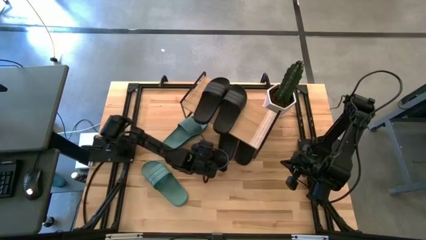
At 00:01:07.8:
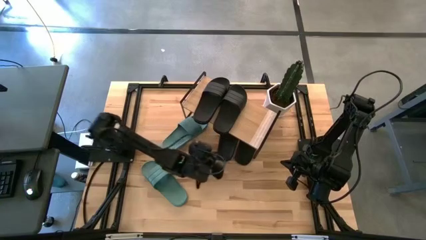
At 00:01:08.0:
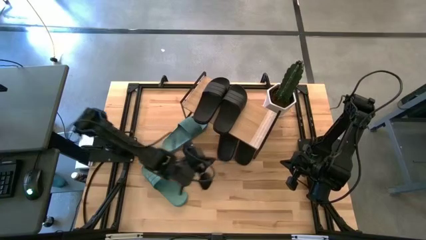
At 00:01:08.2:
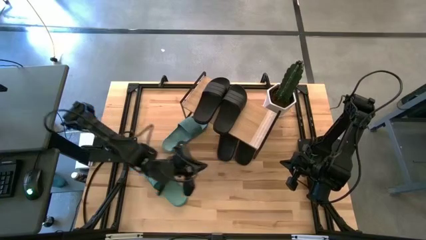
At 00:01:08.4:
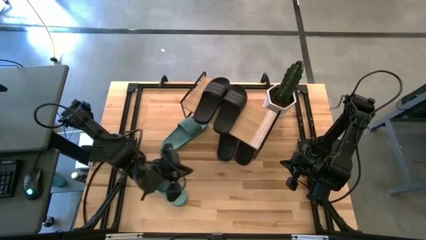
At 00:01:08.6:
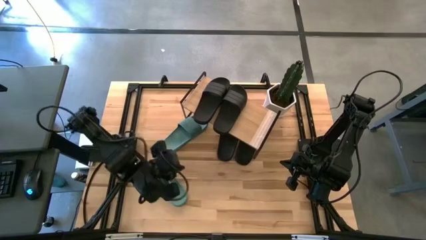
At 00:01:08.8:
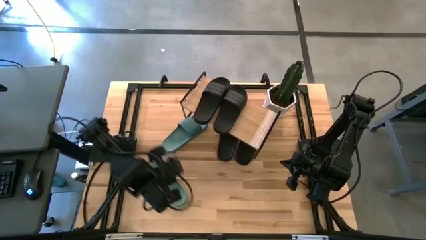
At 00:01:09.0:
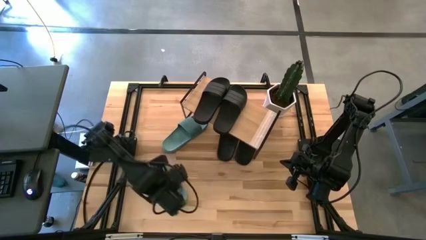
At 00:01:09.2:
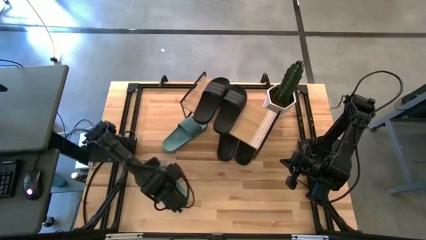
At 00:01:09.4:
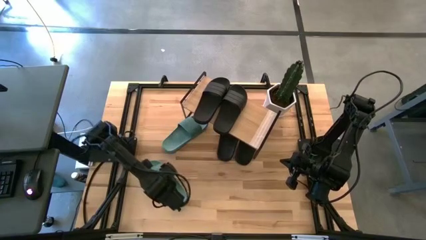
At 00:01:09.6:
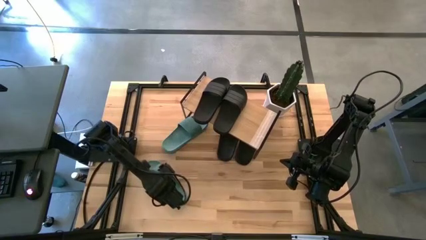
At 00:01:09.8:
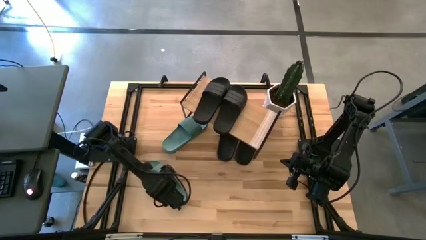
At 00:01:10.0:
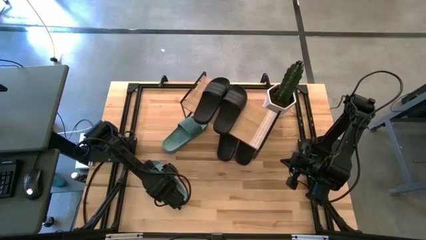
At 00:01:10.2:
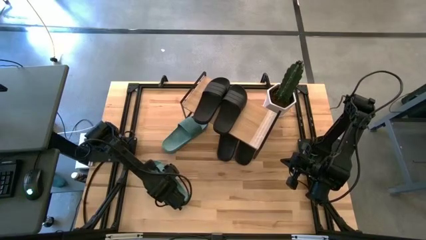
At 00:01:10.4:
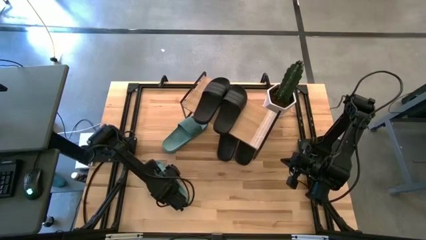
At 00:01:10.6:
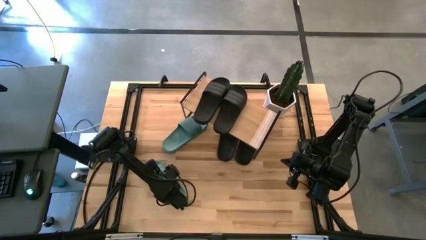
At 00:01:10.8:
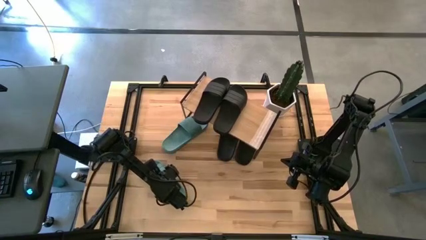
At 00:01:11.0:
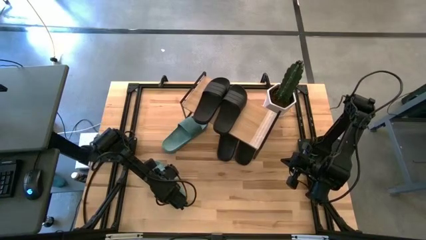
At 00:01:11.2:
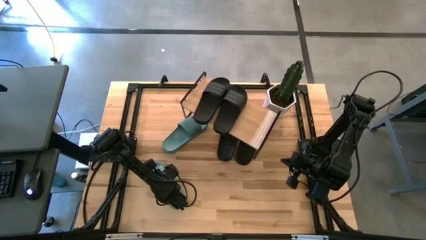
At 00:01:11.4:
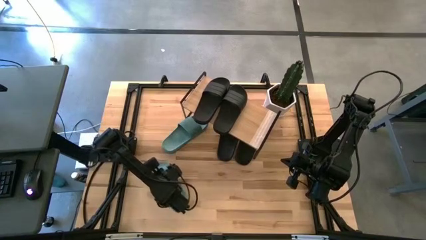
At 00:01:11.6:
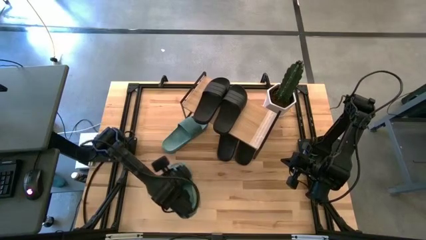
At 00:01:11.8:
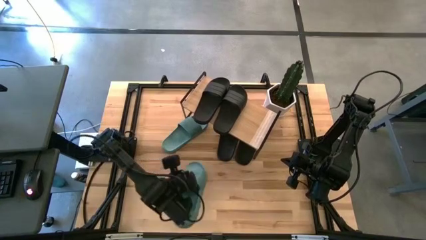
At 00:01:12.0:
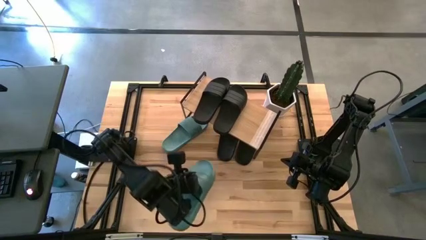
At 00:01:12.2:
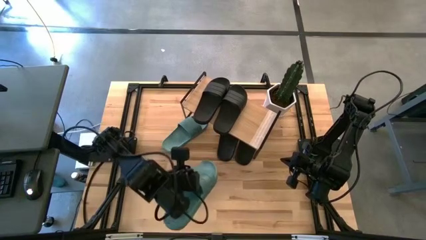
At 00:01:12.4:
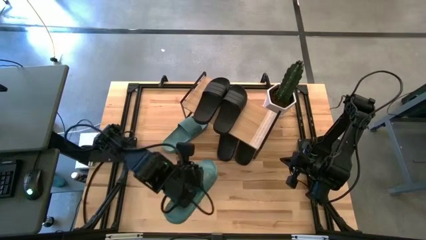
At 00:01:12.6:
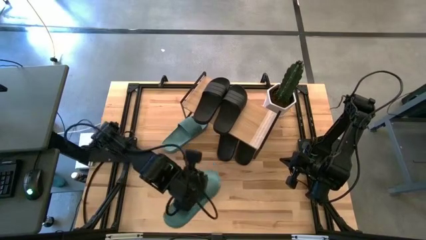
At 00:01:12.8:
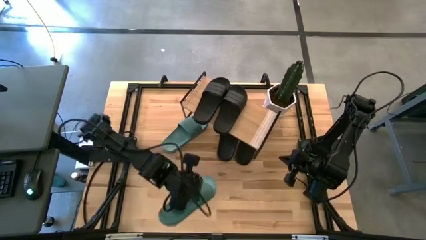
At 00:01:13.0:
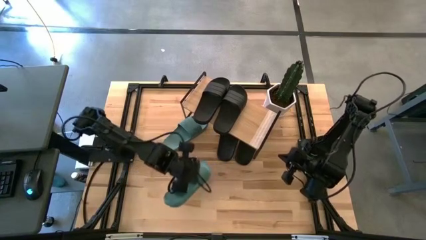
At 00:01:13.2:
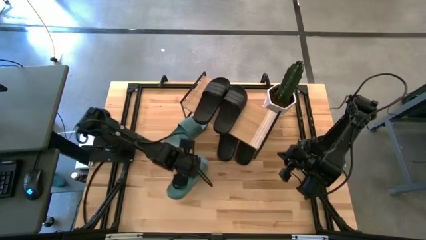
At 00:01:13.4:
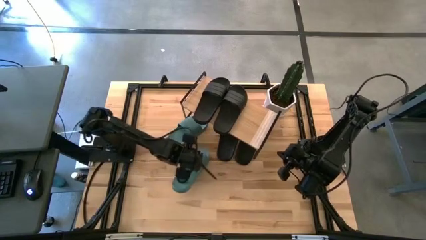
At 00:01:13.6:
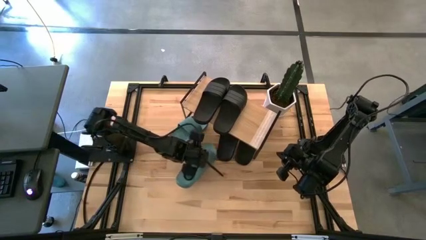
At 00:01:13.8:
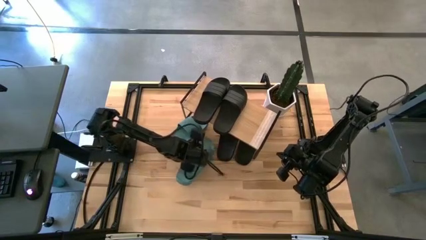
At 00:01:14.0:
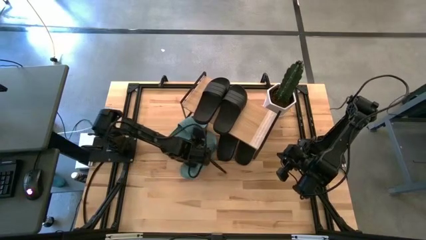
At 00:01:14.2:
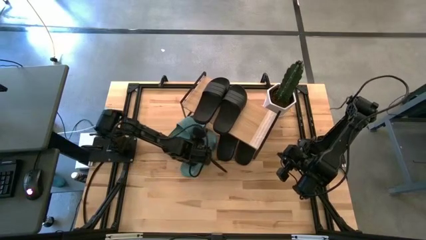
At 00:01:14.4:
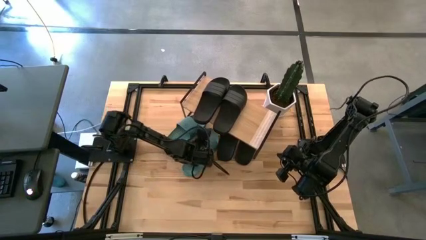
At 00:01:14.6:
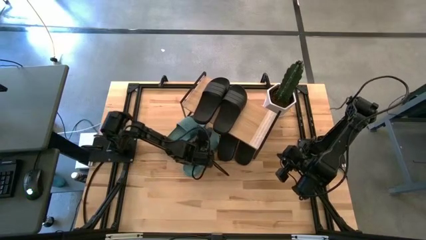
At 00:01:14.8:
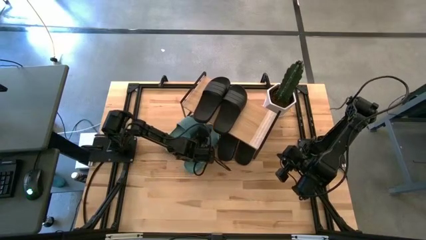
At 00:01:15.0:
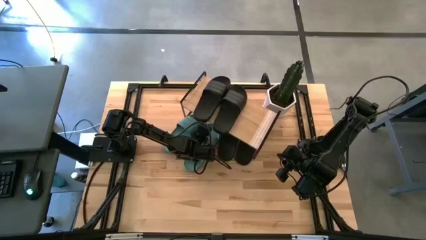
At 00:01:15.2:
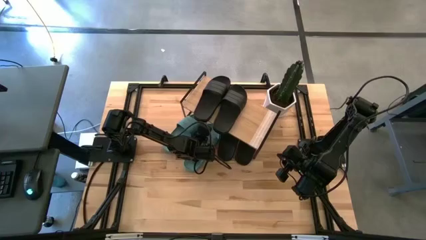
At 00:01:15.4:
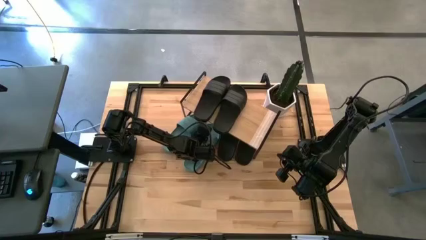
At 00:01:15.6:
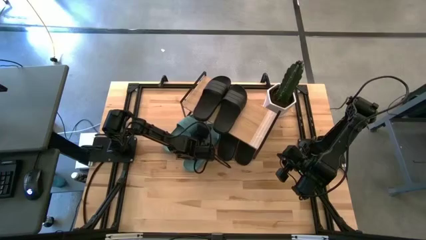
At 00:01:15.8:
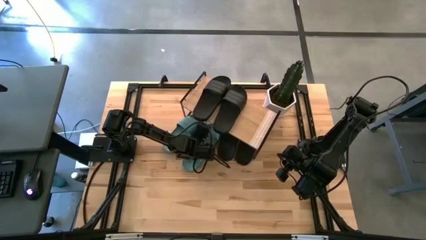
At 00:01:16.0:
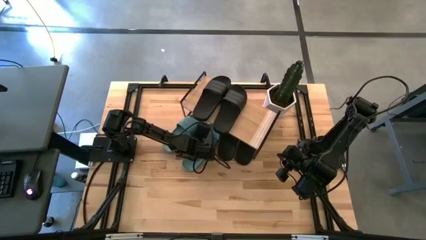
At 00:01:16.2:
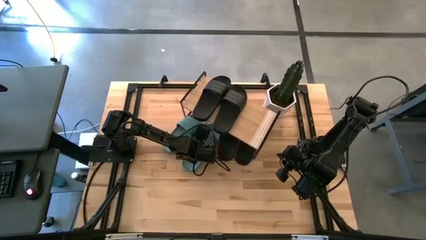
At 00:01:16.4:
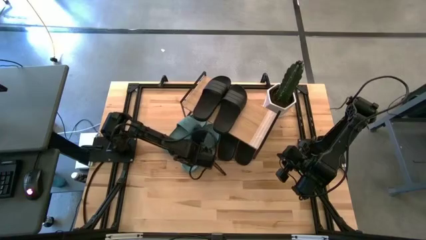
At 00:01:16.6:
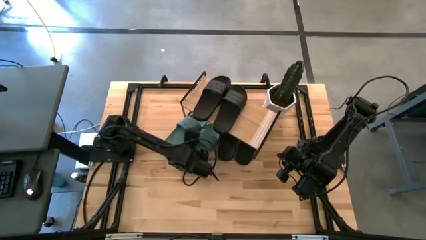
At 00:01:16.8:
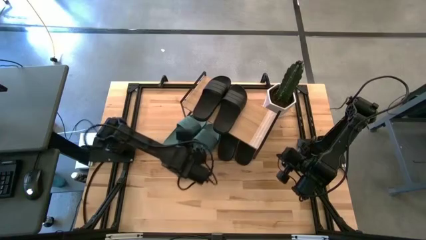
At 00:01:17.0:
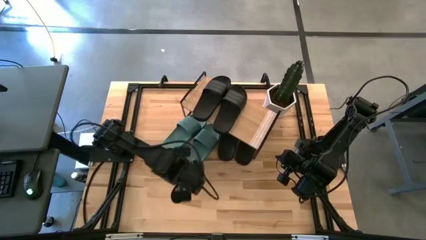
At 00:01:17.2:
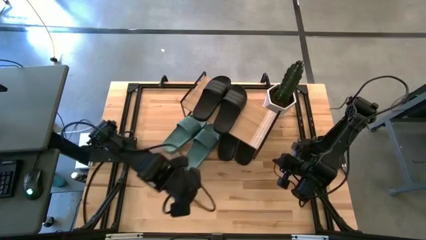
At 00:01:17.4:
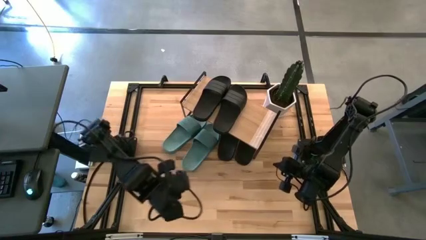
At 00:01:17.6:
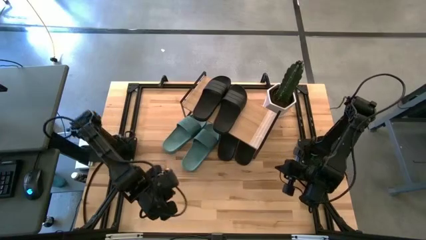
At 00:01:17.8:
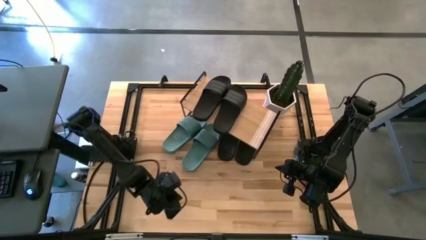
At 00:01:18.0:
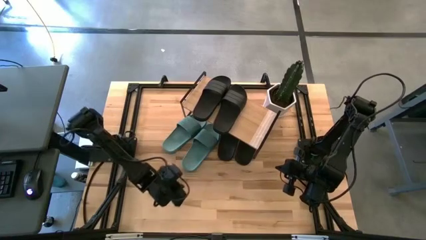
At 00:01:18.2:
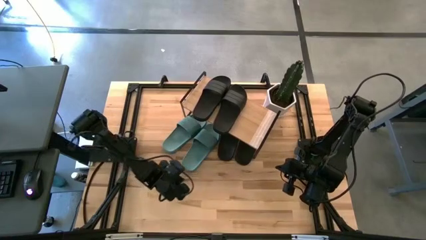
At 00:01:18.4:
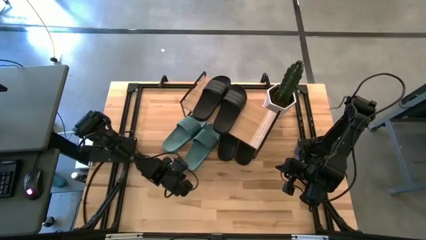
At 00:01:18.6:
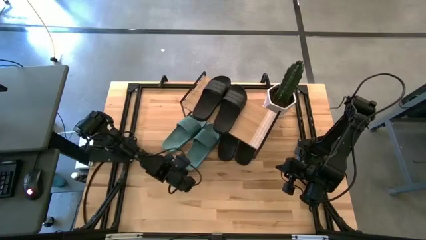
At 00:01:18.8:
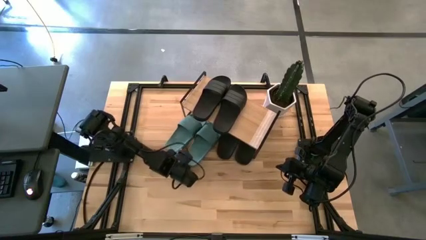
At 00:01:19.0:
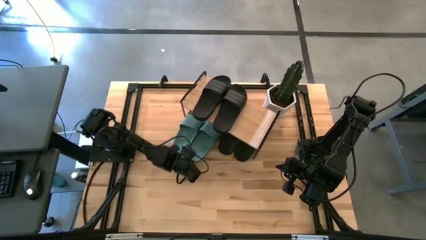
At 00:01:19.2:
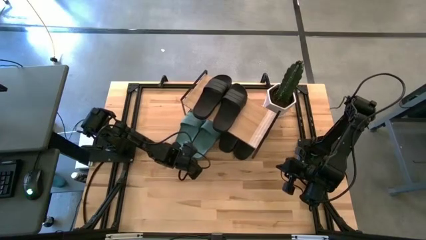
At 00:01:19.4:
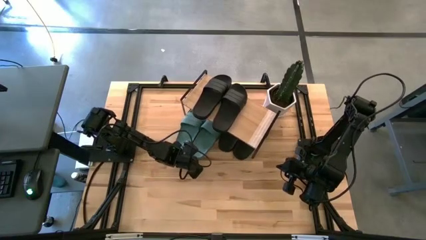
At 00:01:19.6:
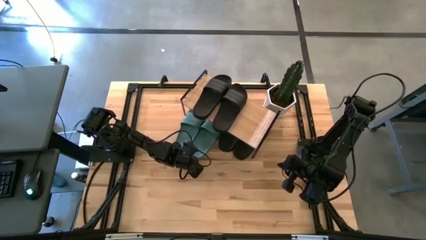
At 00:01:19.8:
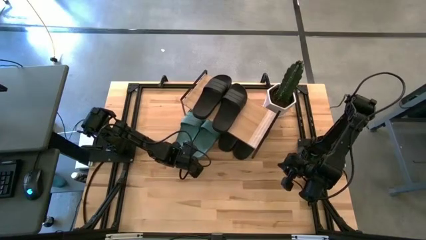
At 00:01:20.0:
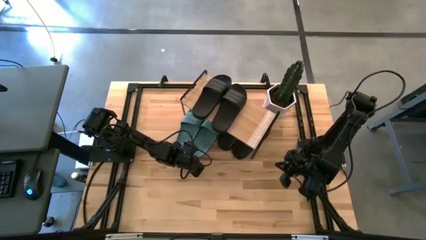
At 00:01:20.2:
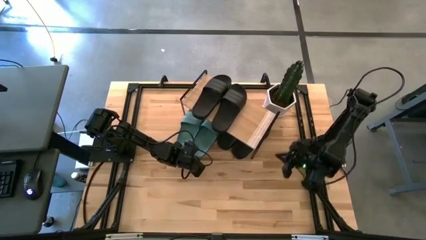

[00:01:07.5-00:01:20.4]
Task: Pick and place slides into the shelf
Put the green slide under the shelf

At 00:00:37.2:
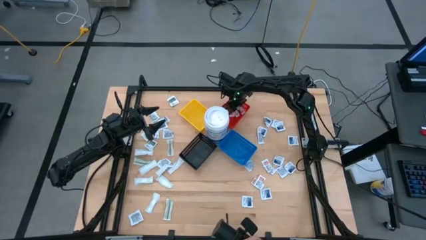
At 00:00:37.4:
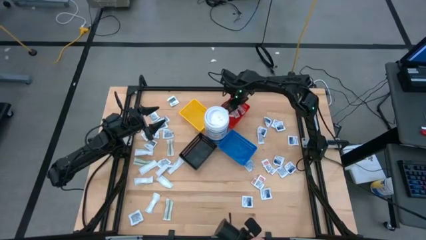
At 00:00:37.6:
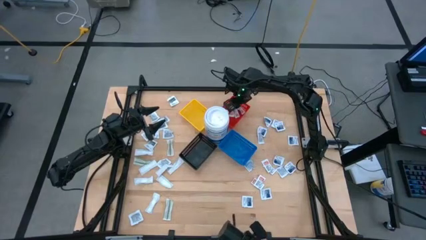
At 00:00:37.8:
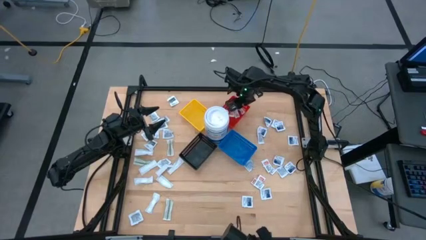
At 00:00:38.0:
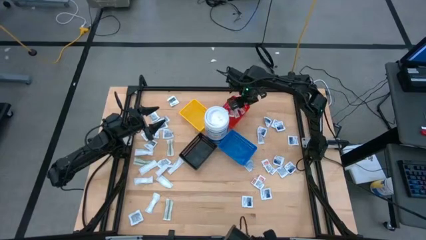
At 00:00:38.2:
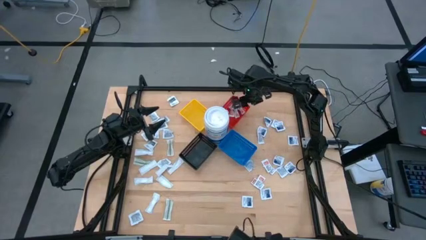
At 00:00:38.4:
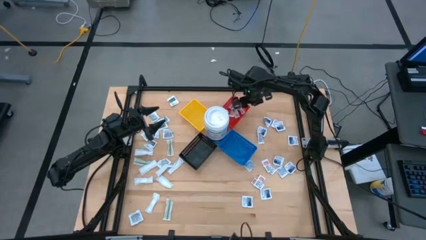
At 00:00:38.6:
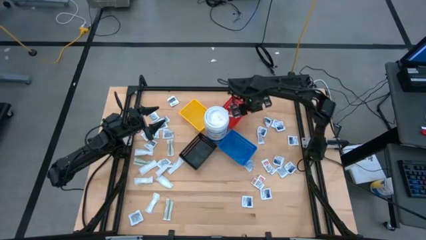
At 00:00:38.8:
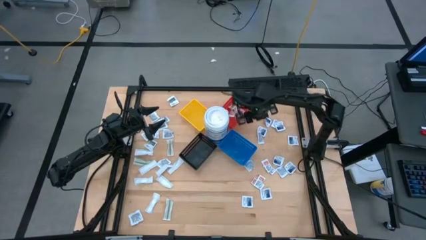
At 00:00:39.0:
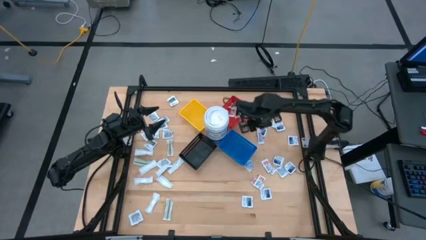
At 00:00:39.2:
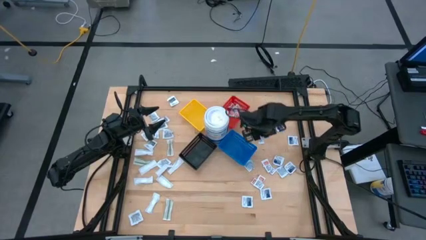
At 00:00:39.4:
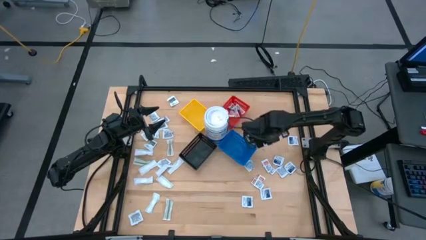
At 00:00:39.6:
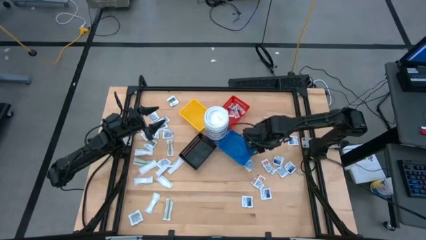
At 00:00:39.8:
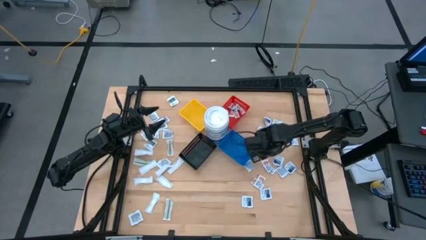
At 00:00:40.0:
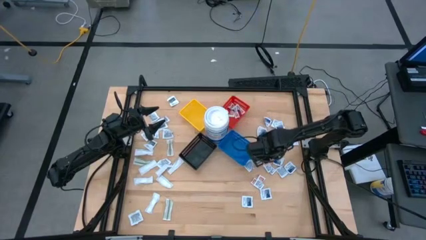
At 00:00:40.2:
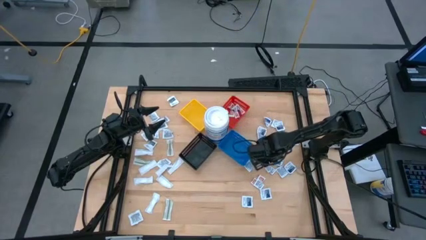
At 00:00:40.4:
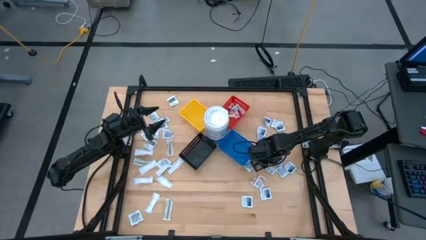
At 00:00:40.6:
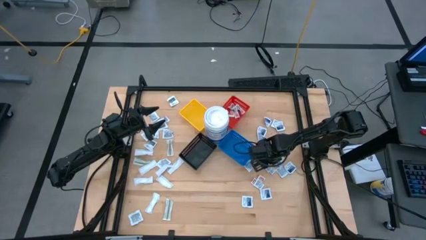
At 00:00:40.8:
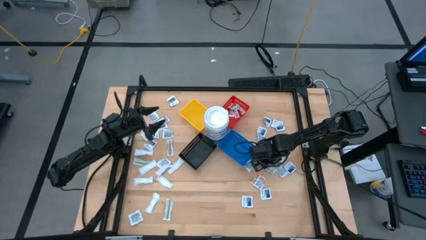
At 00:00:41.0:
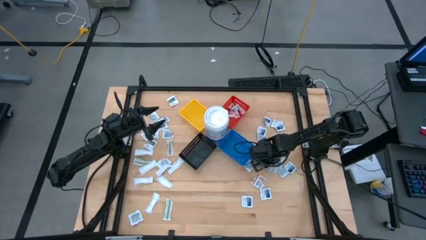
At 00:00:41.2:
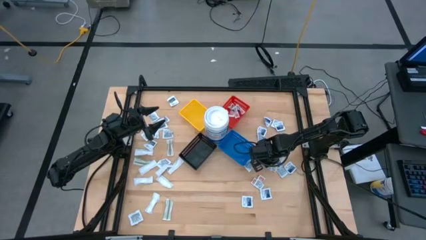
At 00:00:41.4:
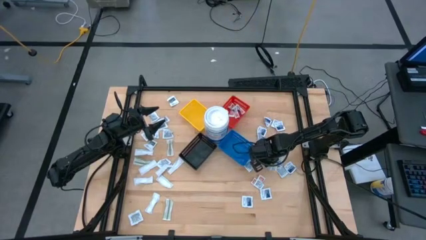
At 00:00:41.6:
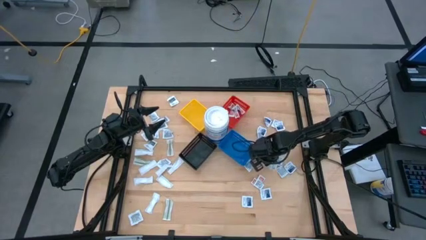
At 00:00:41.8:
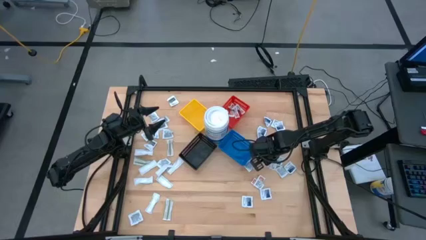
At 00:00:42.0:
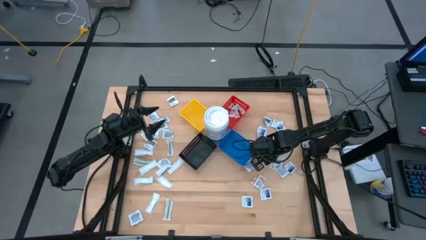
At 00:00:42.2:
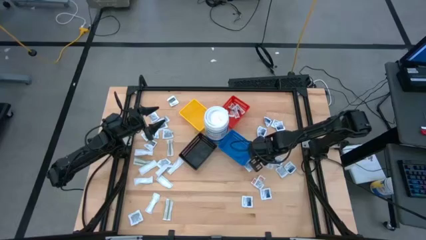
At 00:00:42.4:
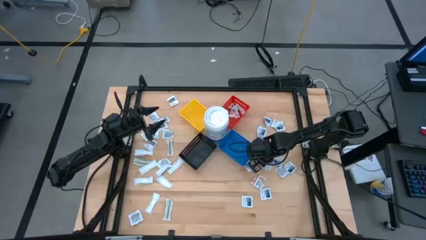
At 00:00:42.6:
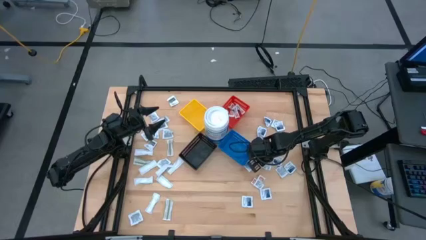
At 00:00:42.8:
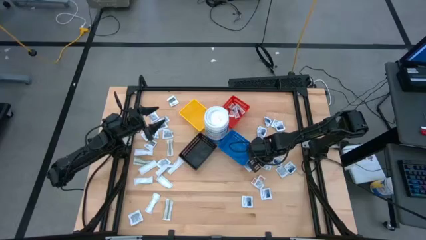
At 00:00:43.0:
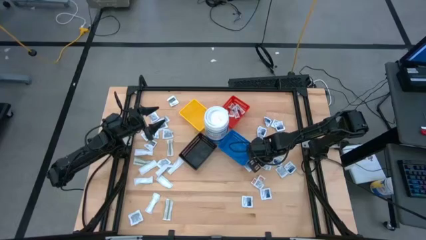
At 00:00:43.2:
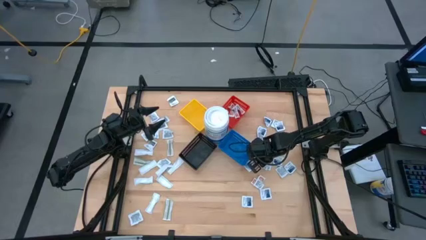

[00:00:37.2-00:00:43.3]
Task: Pick & Place First Aid Supplies
Put the ointment pack into the red bin
